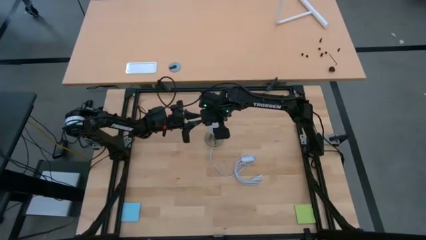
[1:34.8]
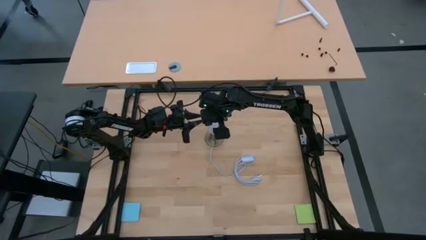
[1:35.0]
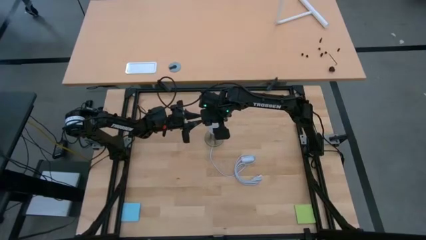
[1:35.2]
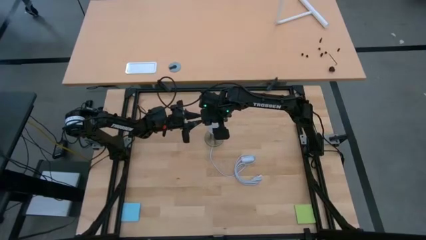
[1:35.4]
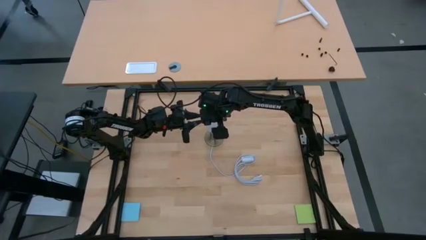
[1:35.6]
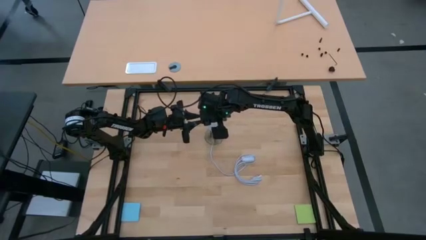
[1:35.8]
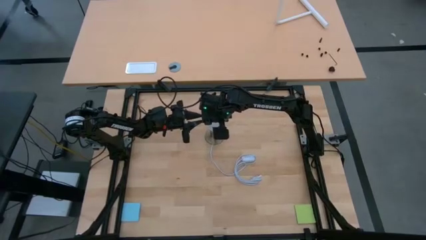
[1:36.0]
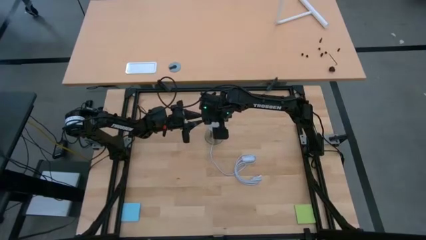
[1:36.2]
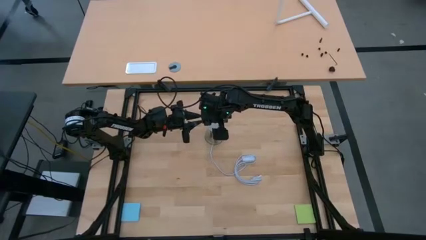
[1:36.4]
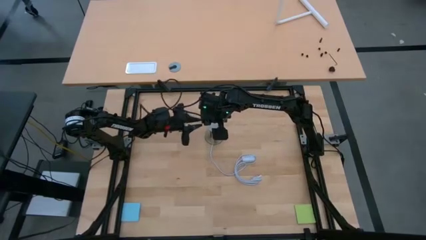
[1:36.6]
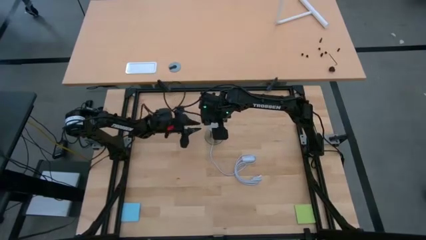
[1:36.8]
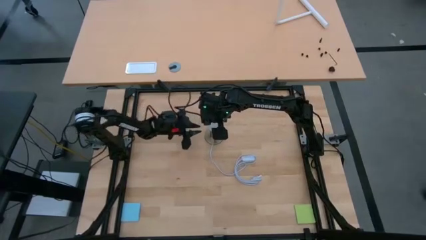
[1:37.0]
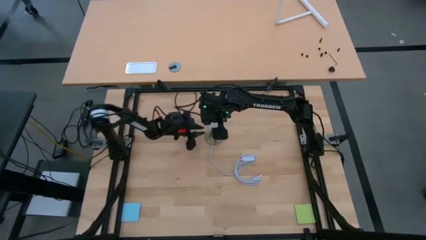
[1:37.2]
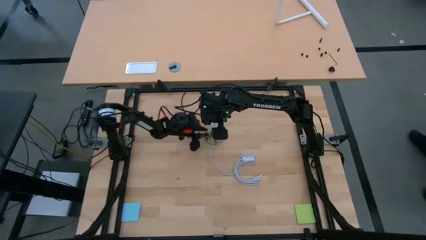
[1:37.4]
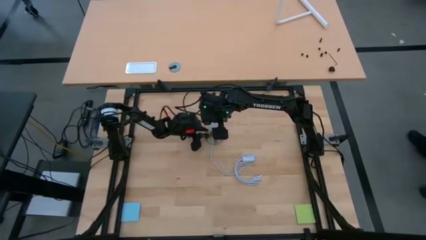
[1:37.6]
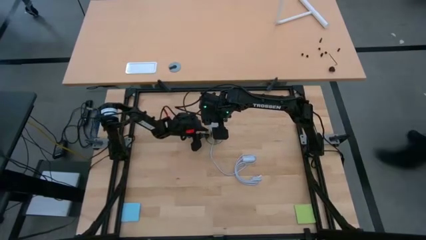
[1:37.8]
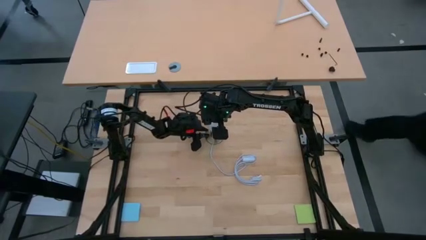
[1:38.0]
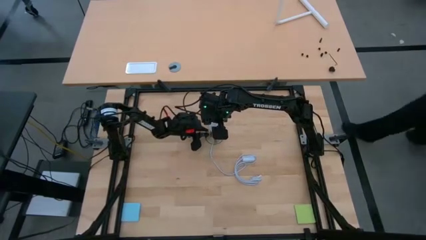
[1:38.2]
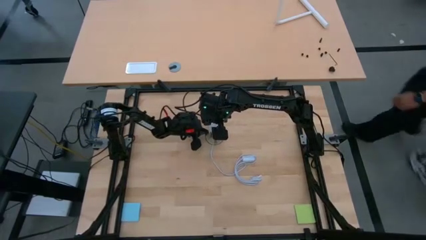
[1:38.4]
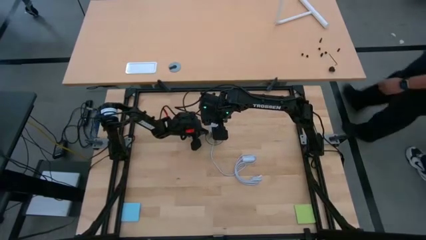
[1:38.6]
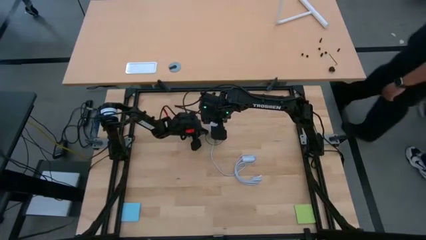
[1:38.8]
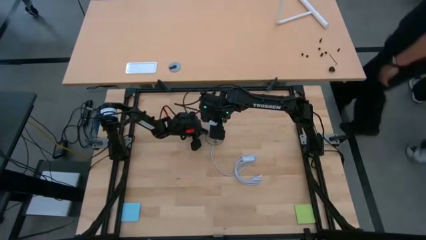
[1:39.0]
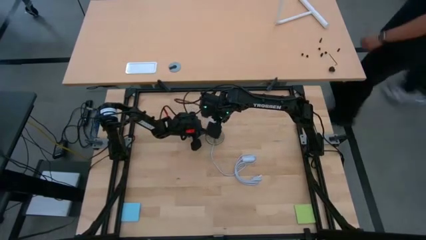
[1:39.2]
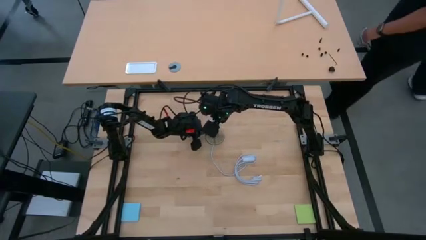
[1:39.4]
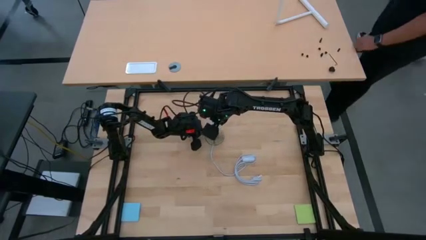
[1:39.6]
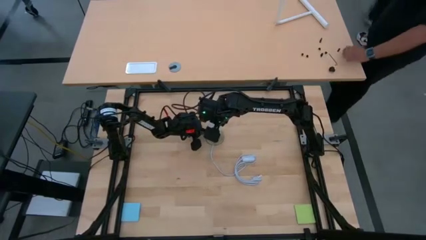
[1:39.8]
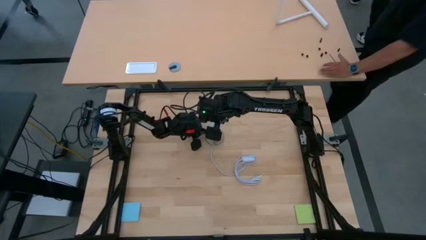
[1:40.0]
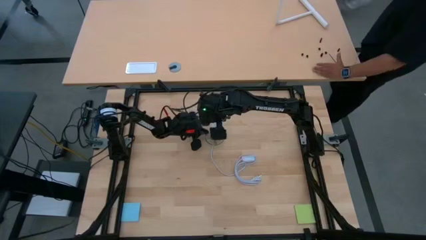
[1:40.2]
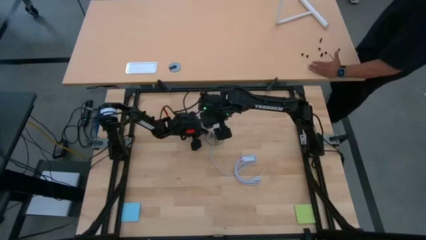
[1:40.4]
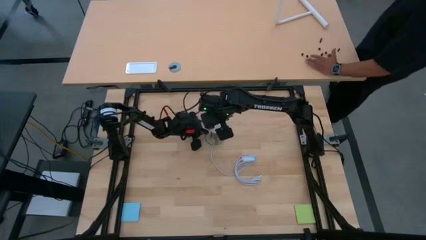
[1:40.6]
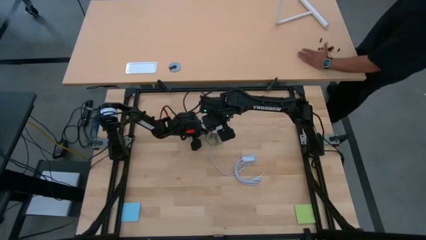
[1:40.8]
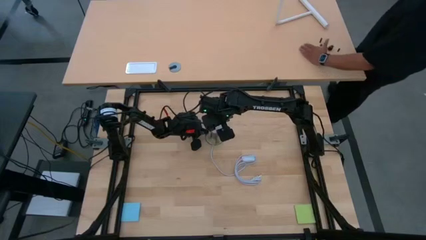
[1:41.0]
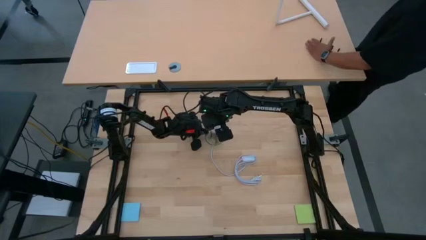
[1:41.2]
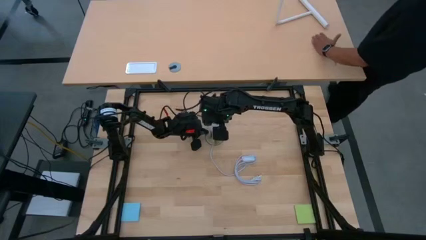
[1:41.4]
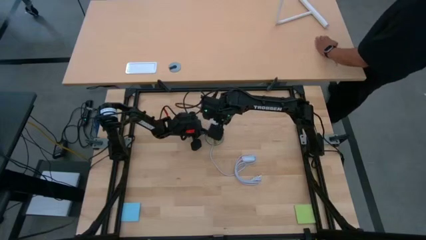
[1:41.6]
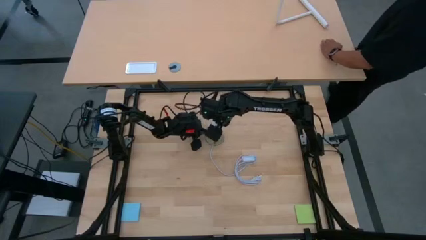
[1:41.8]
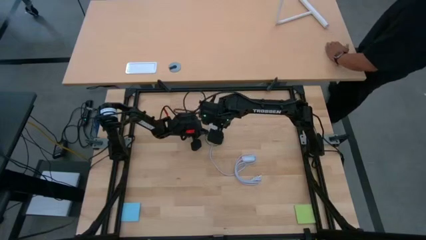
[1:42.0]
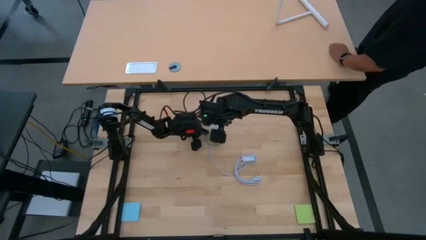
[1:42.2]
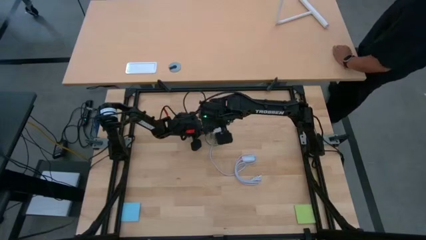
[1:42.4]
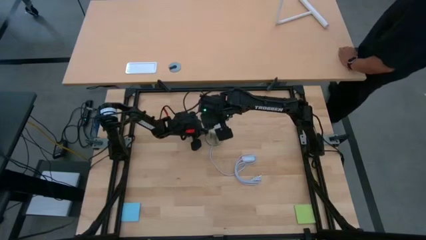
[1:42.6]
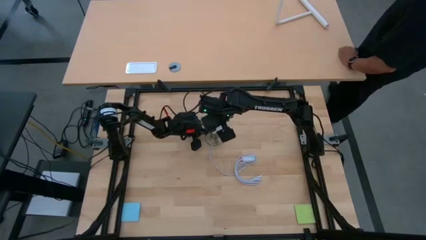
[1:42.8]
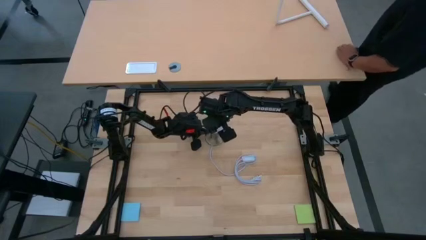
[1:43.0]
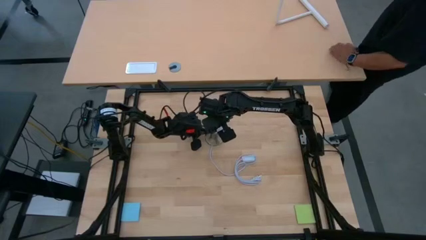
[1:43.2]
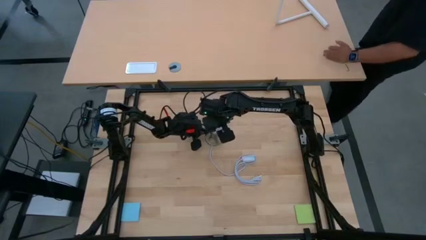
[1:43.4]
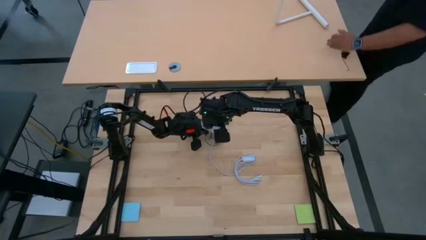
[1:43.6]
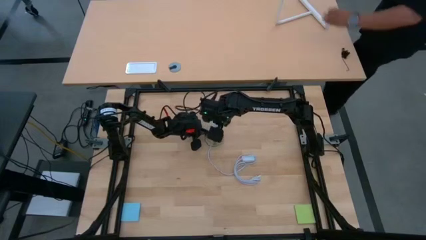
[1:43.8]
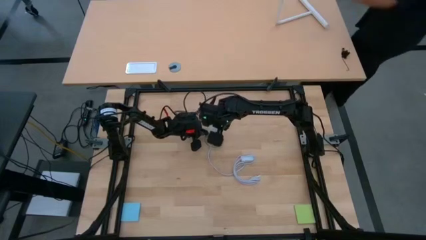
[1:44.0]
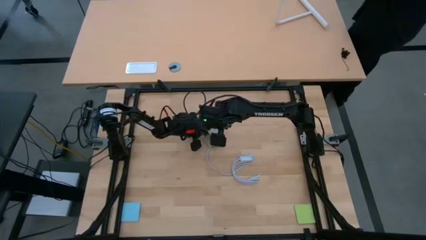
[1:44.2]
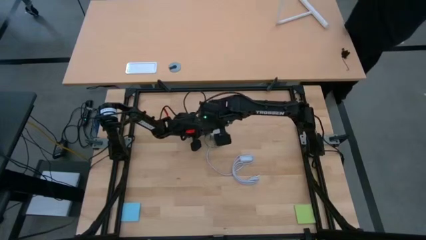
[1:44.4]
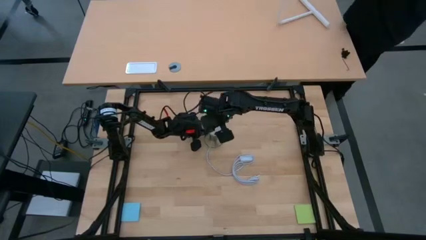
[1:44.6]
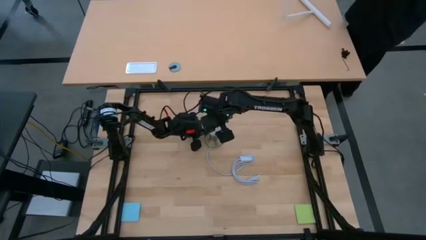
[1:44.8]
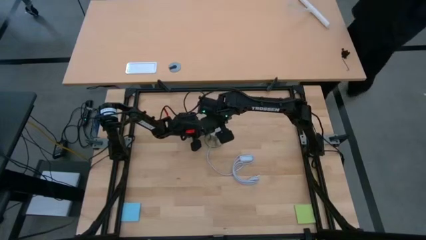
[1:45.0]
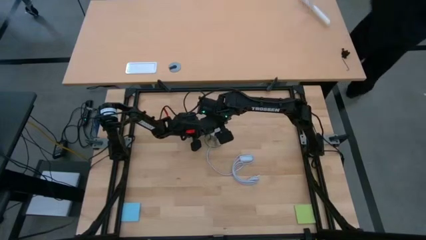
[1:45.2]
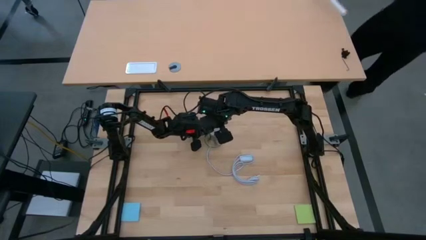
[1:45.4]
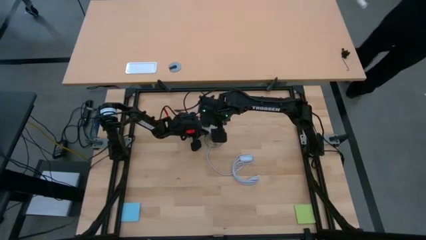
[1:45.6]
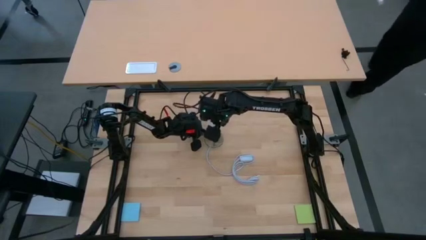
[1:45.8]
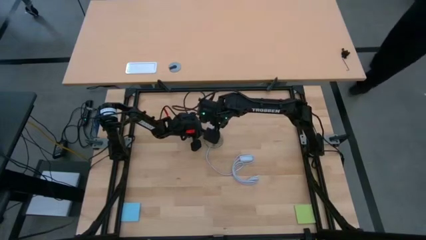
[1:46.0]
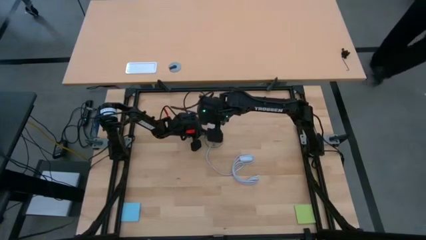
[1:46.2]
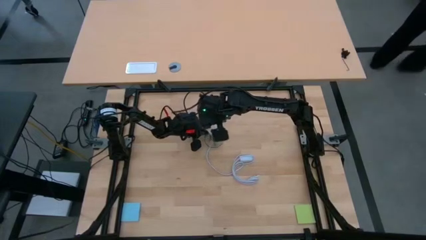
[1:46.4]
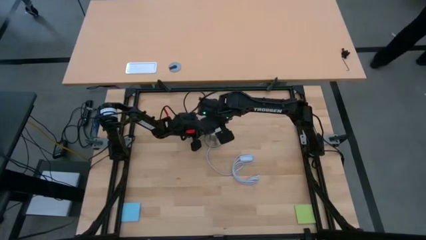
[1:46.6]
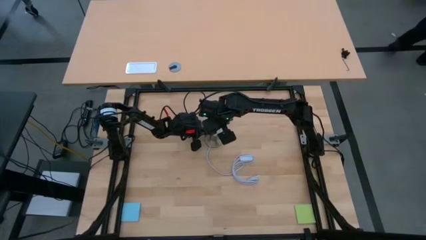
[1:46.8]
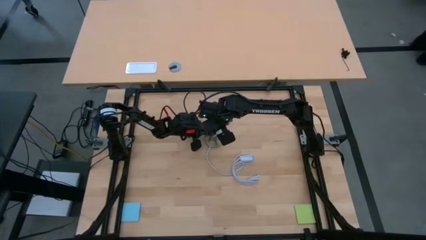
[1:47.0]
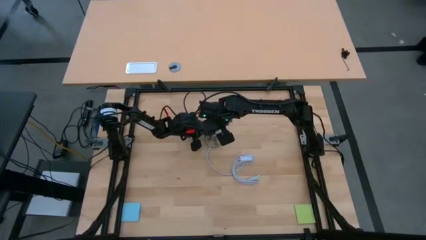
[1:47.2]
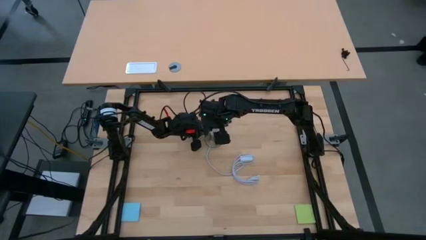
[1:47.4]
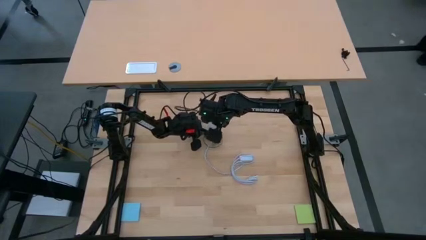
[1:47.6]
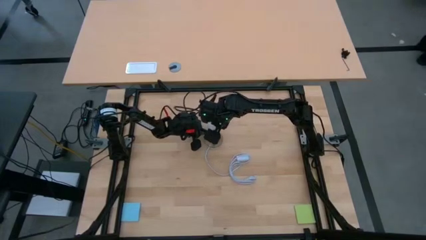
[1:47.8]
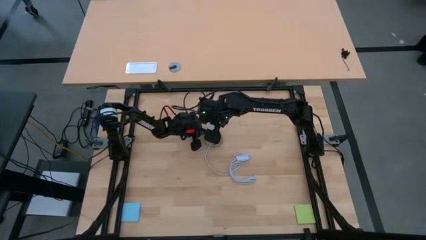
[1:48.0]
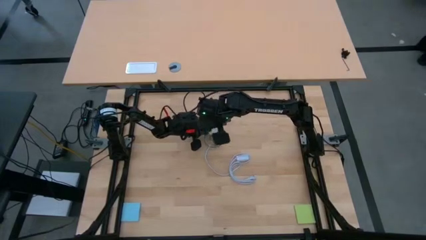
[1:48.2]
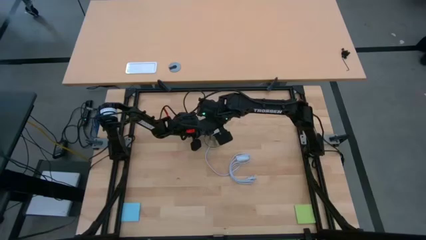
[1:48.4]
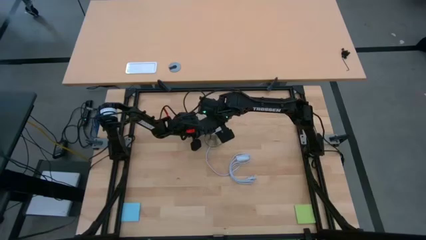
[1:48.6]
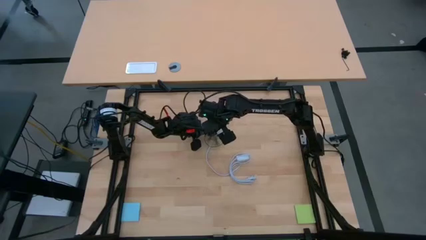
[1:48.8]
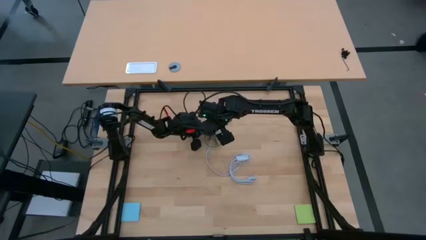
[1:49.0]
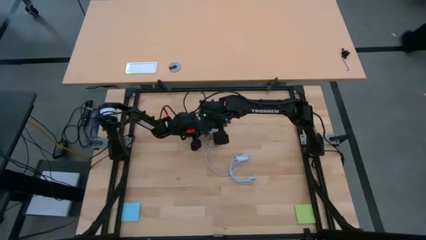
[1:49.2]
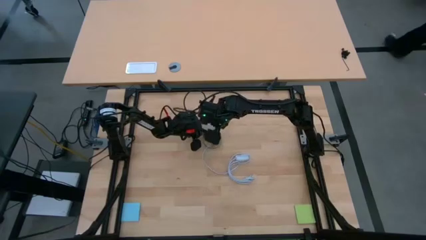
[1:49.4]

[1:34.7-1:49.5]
Task: Screw lightbulb
Insert the white lightbulb into the golden lamp
